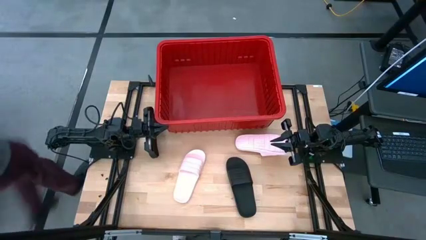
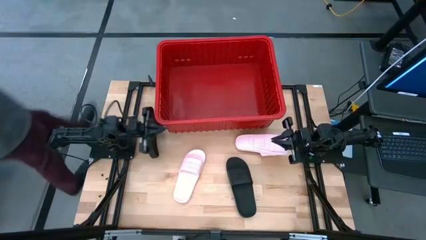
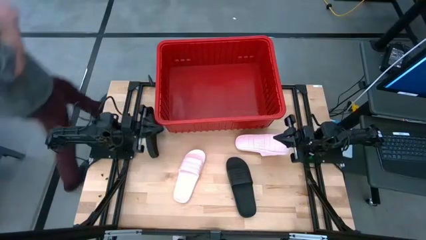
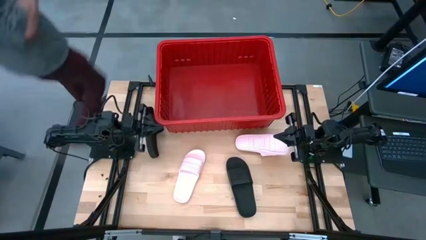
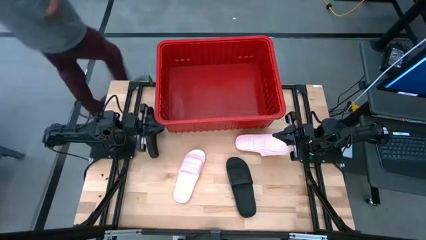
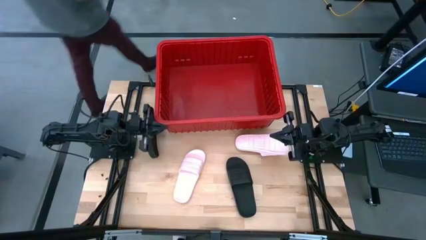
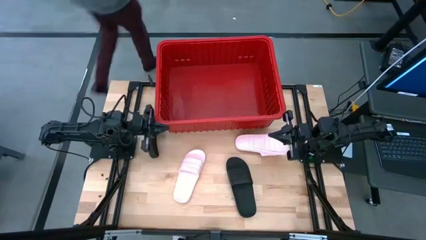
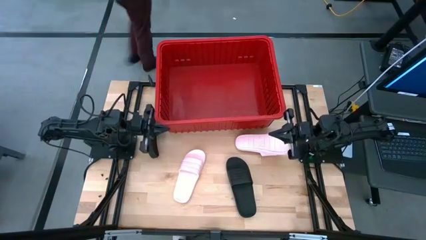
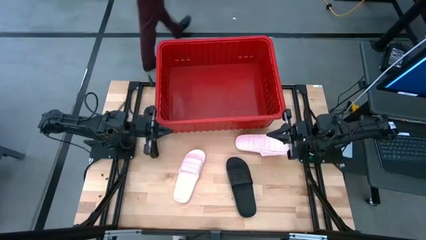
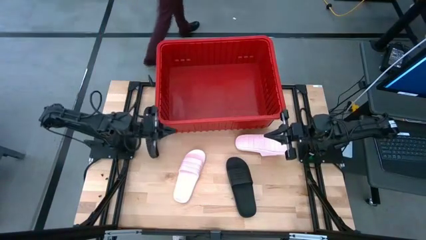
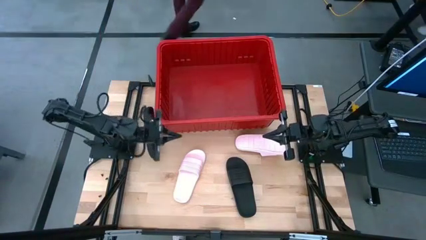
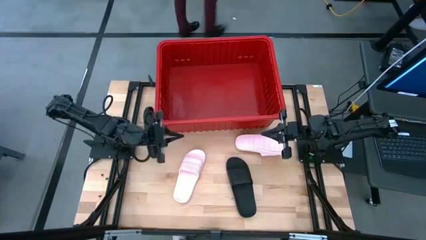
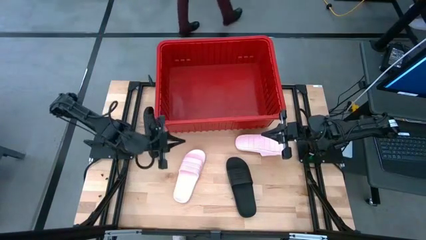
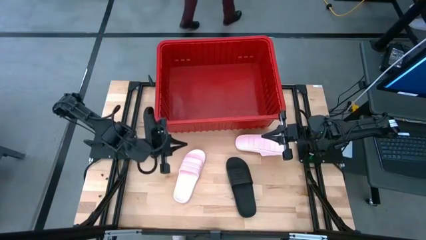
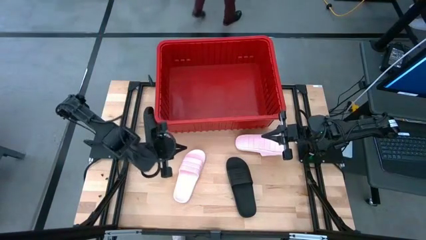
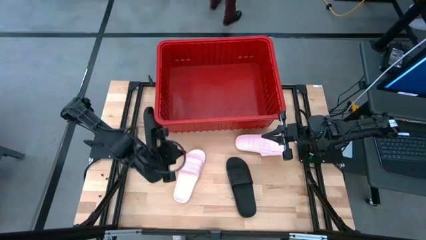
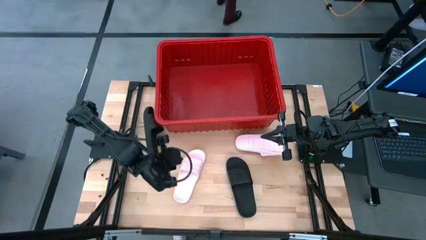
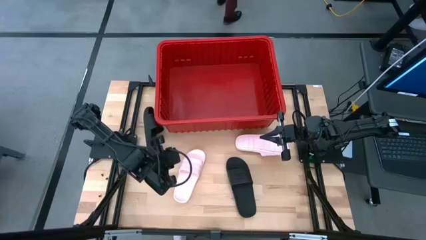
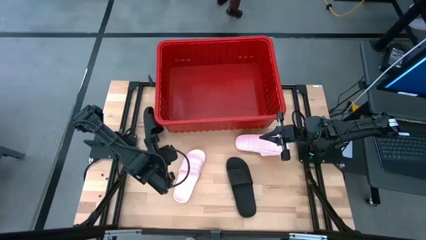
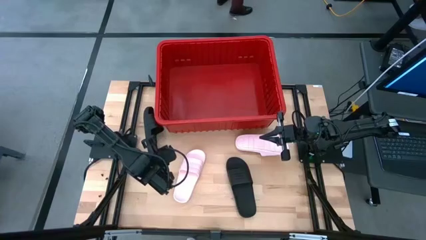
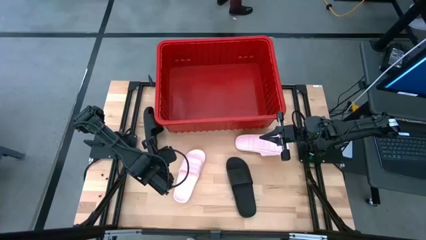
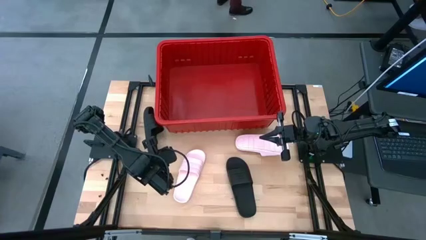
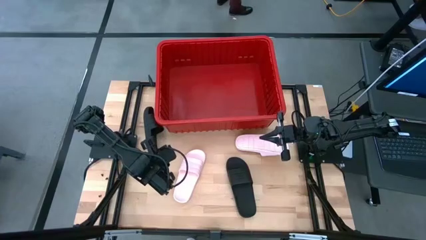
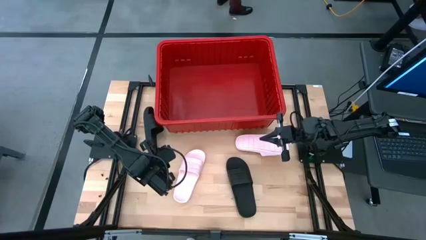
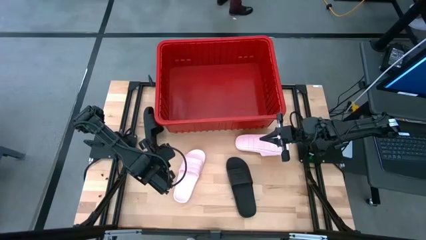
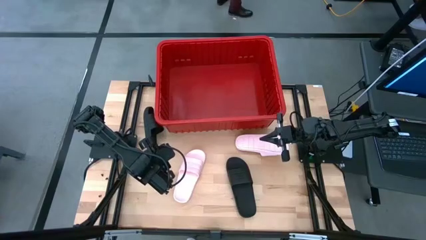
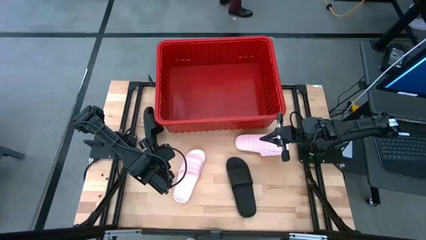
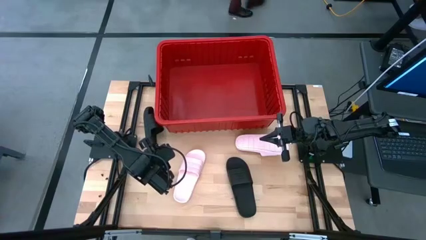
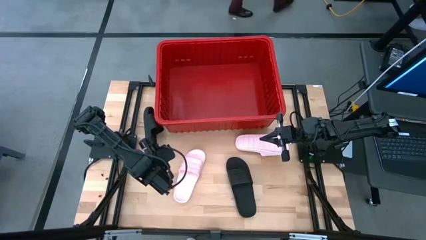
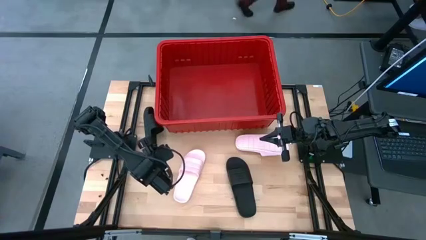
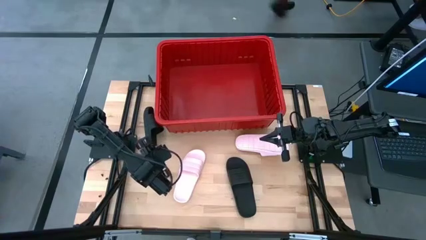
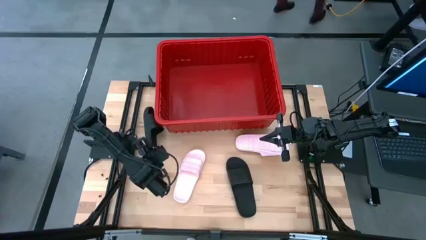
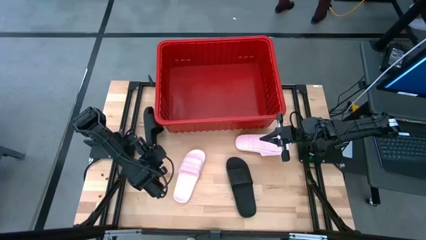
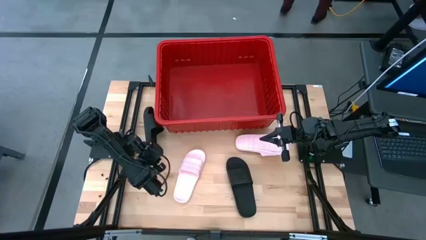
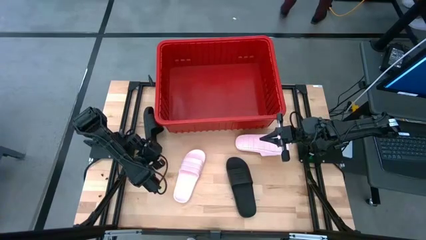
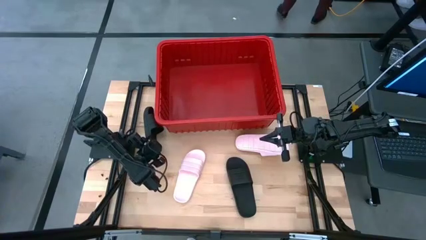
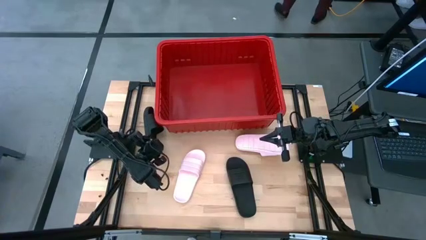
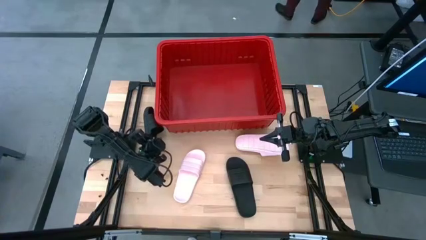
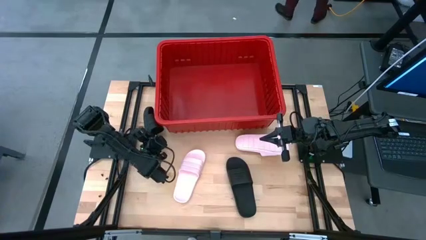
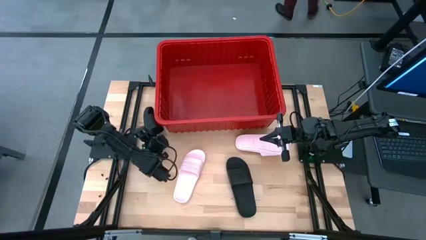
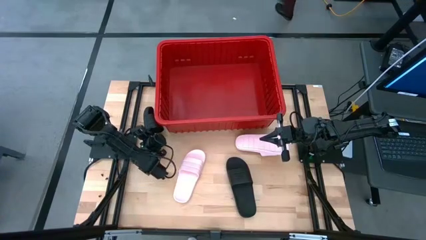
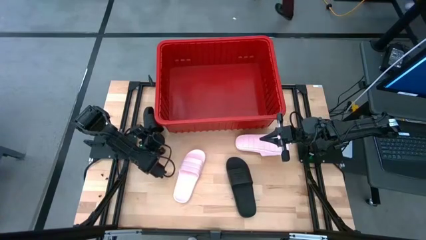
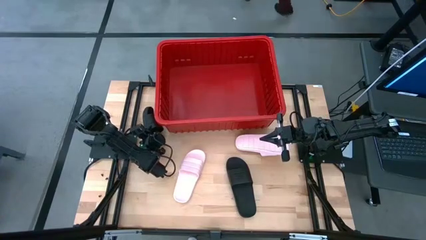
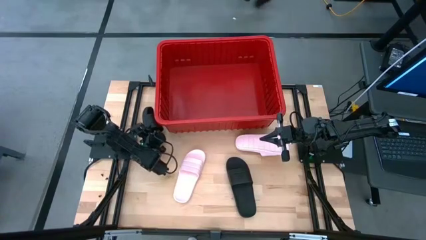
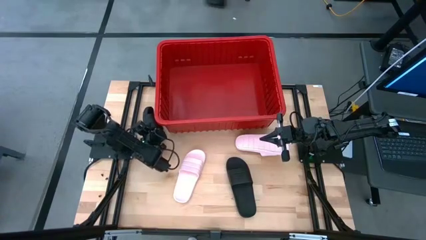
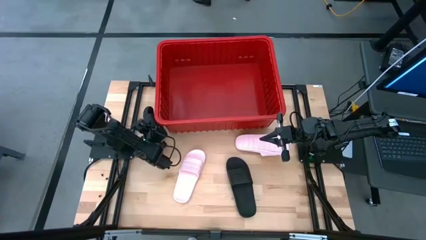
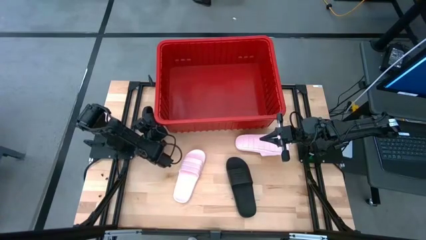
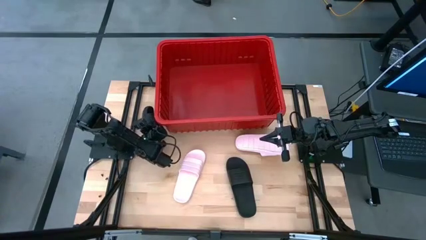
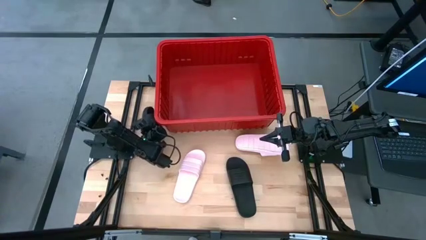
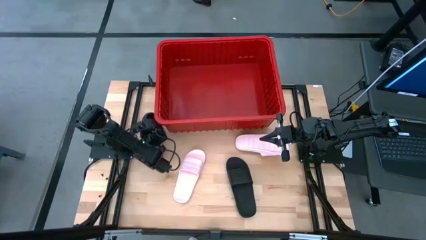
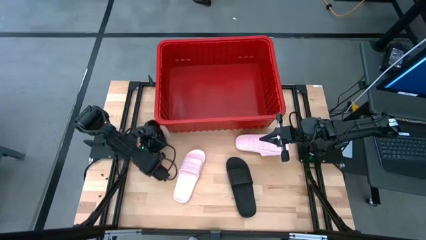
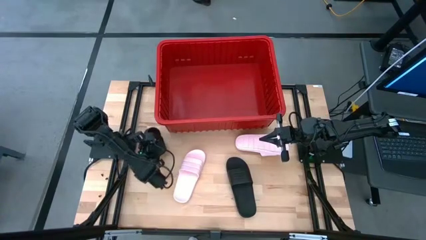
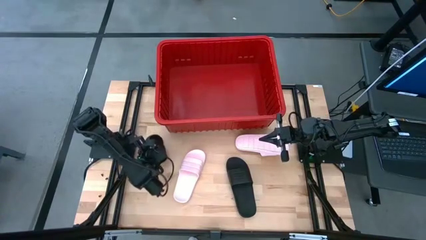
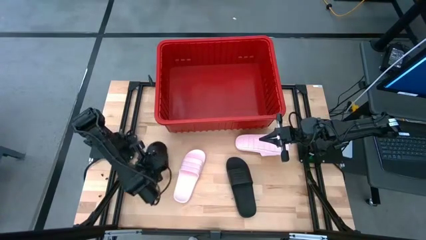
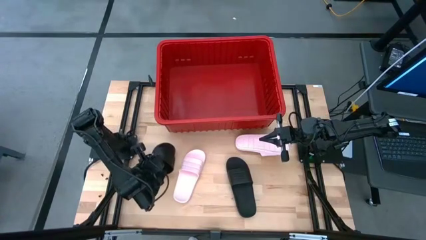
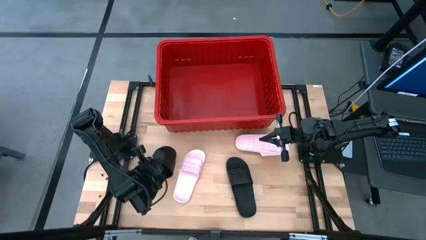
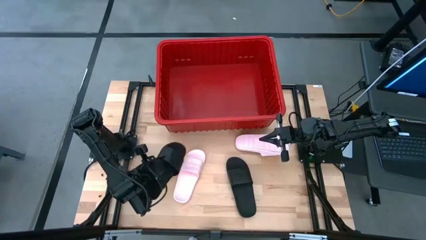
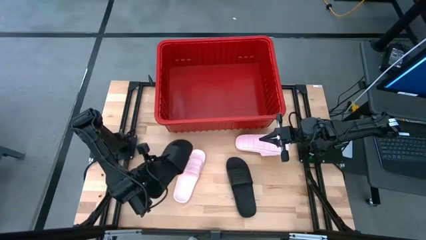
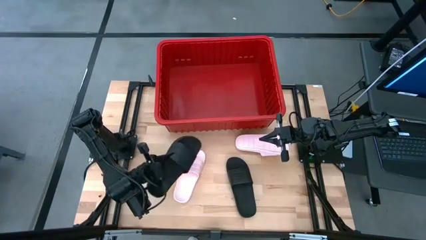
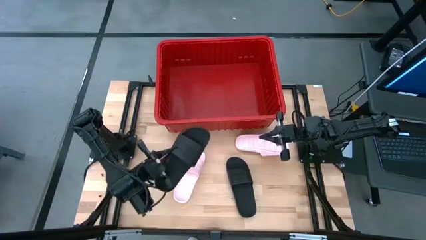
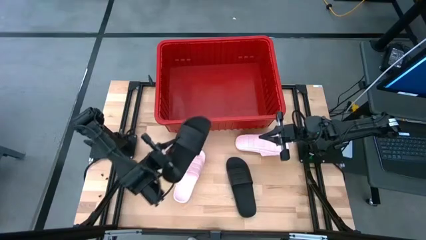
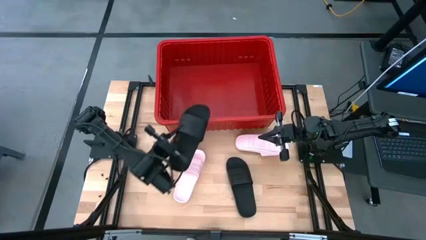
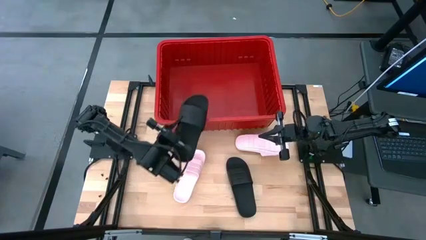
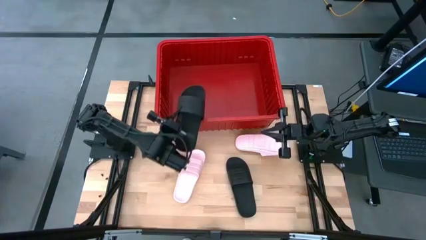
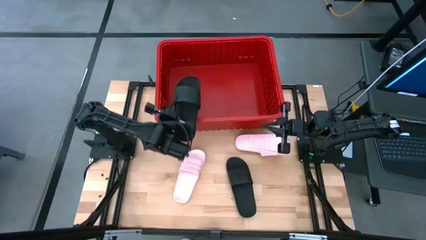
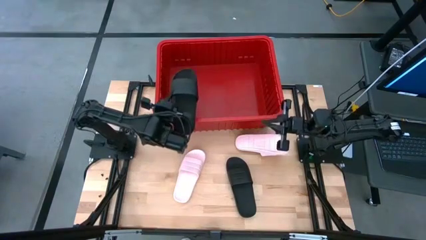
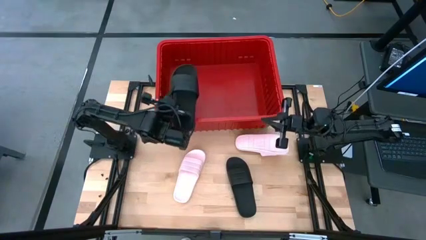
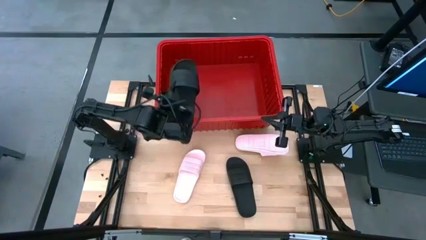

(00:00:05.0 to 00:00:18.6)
Task: Pick and place slides into bin
Put the top black slipper into the red bin

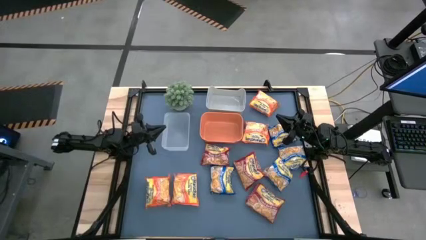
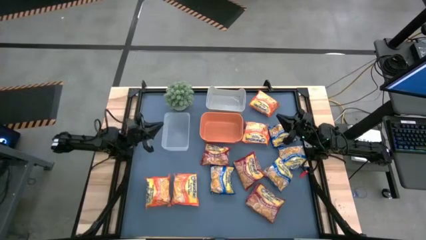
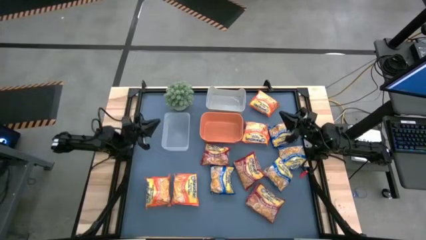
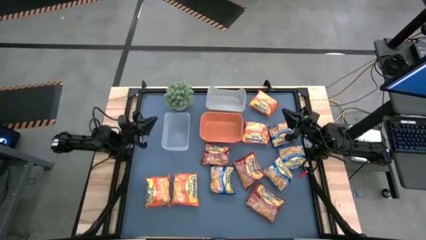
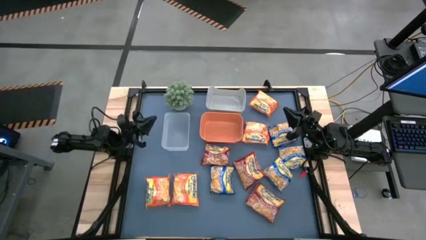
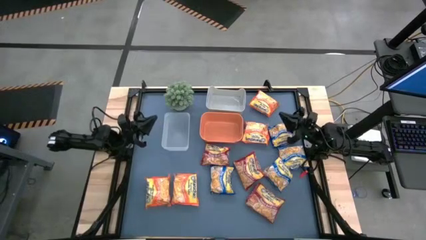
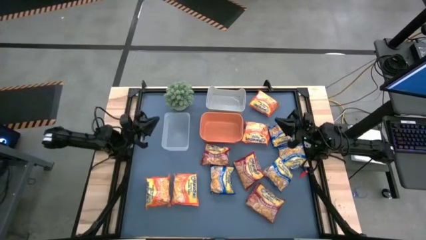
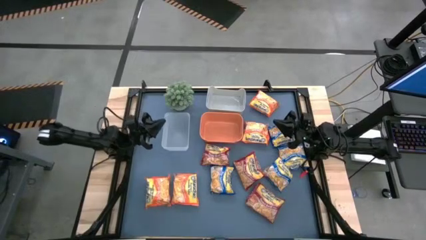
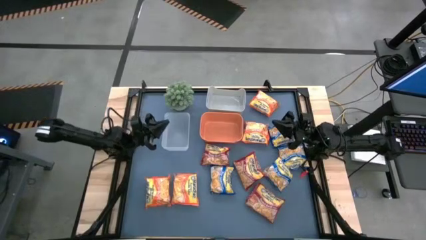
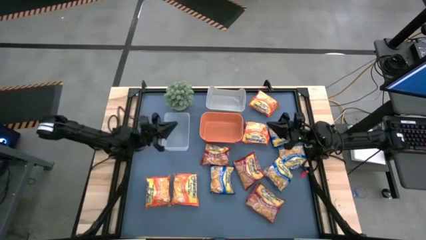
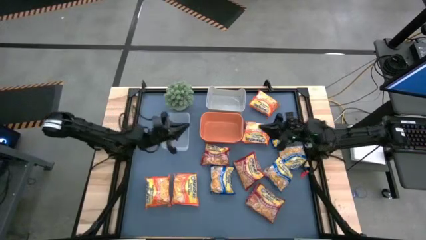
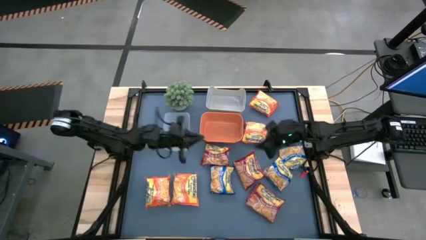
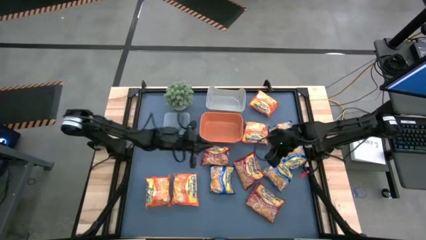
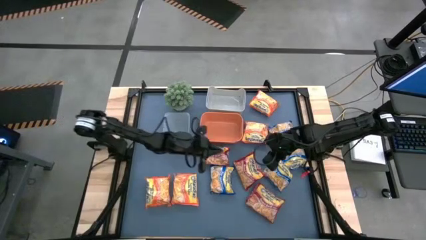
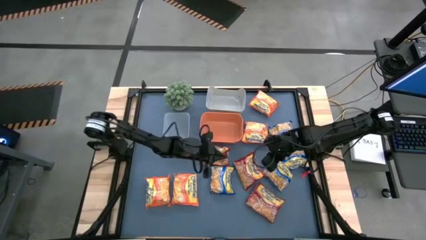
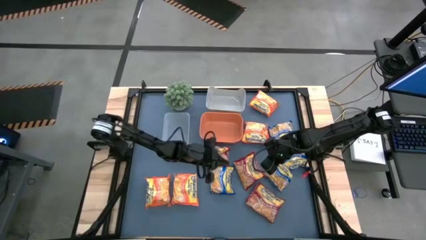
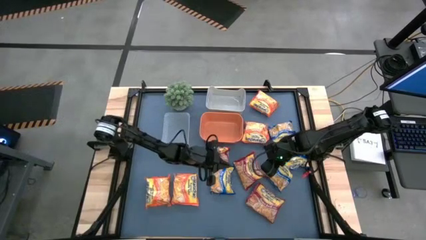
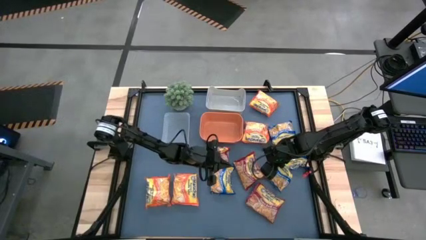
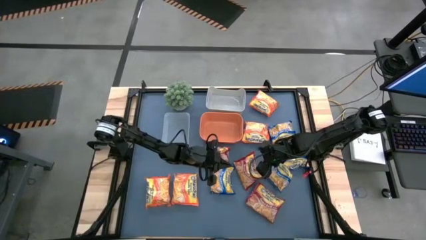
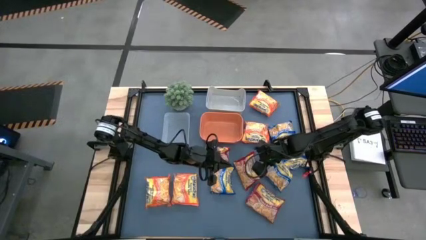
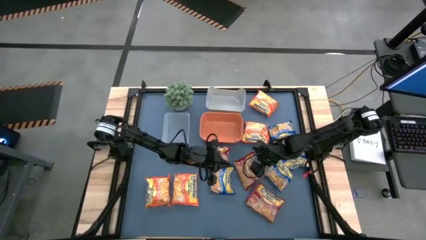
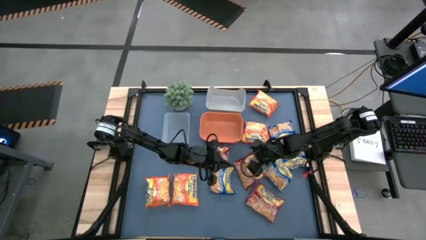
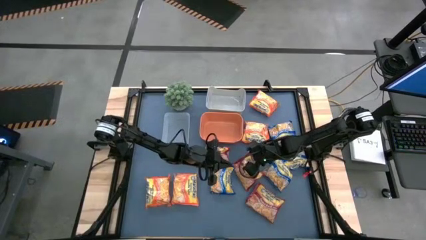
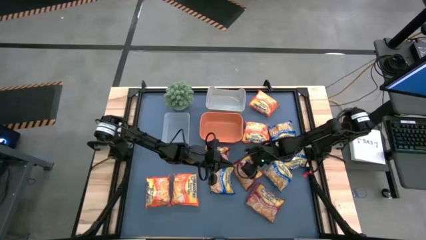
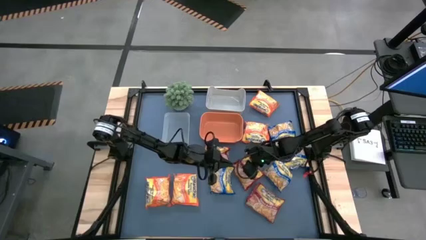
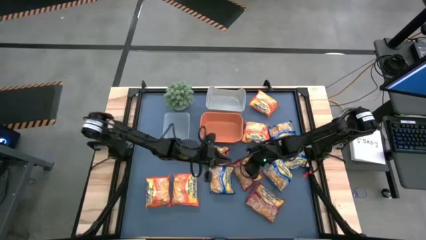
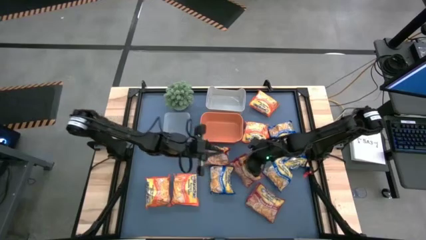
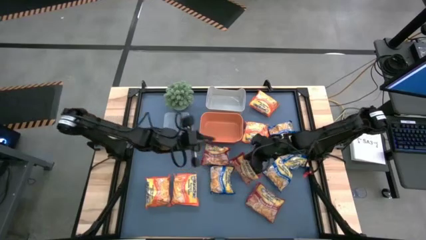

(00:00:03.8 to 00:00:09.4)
Task: Sort Maruchan noodles
Put the red noodle pack into the orange bin
